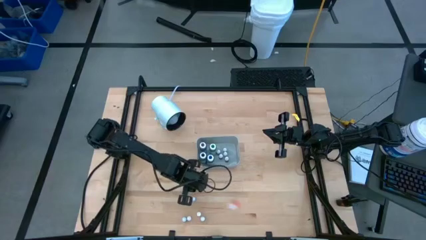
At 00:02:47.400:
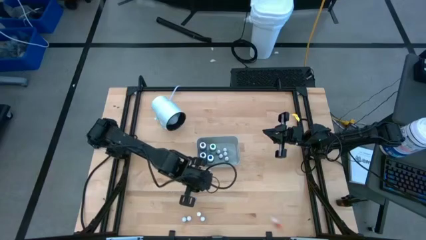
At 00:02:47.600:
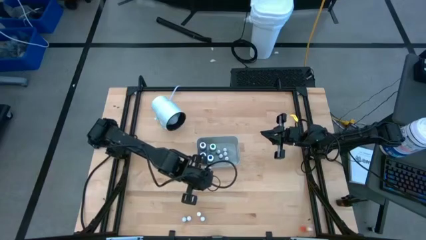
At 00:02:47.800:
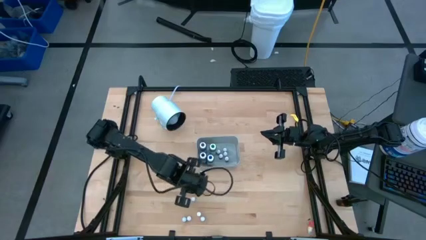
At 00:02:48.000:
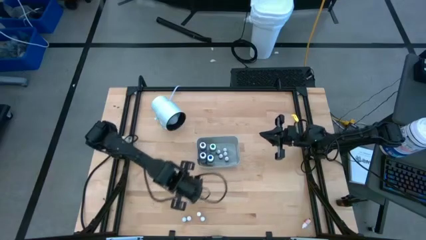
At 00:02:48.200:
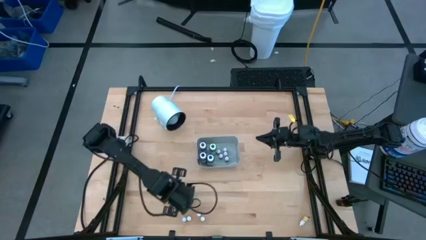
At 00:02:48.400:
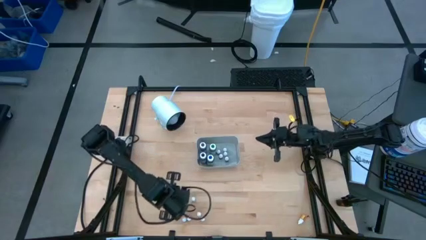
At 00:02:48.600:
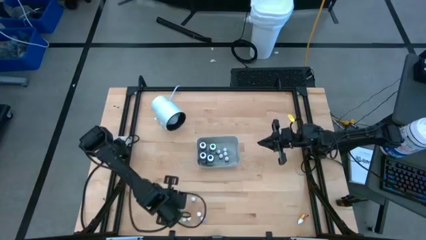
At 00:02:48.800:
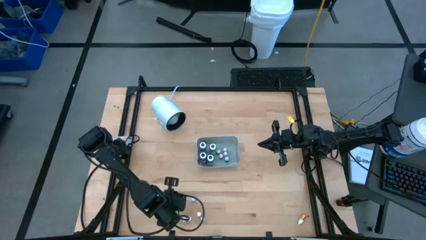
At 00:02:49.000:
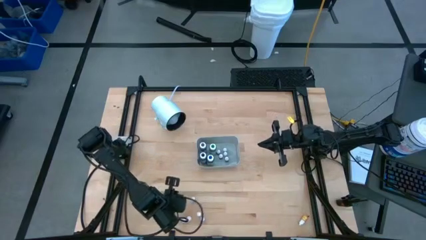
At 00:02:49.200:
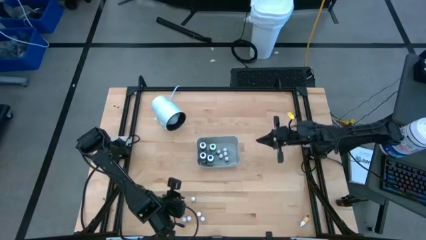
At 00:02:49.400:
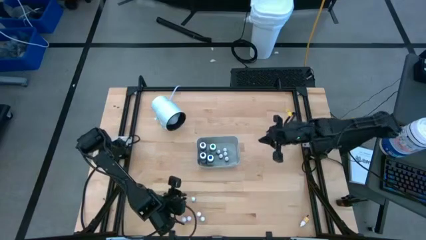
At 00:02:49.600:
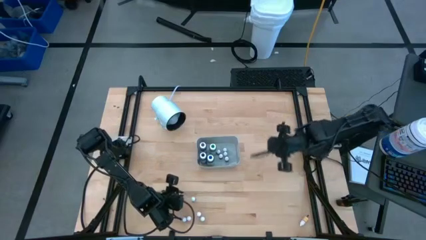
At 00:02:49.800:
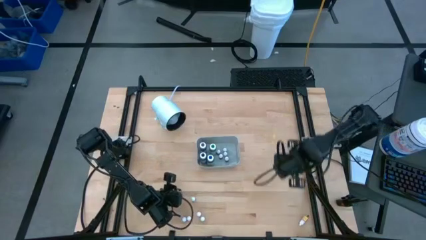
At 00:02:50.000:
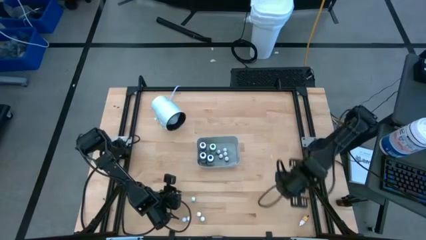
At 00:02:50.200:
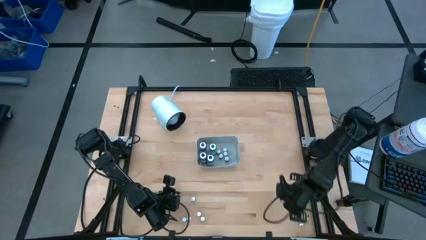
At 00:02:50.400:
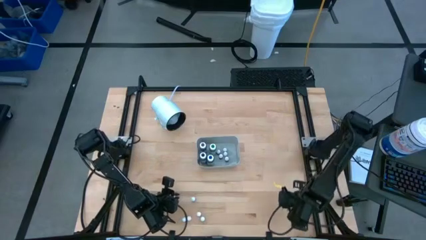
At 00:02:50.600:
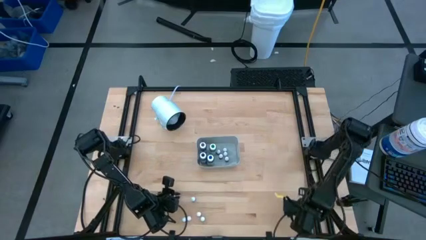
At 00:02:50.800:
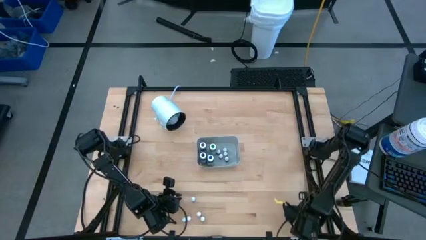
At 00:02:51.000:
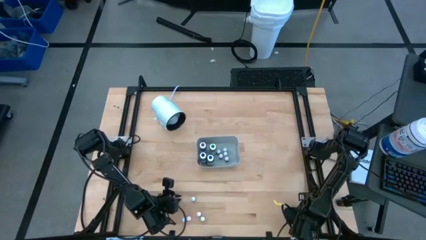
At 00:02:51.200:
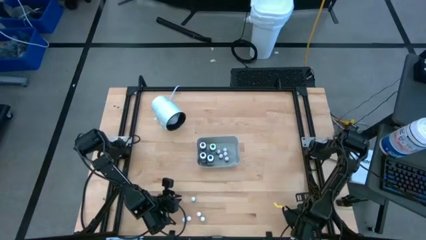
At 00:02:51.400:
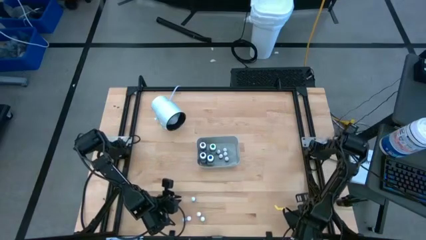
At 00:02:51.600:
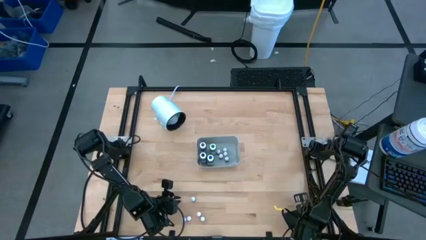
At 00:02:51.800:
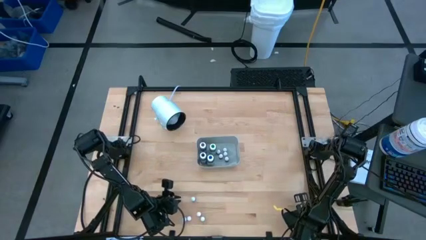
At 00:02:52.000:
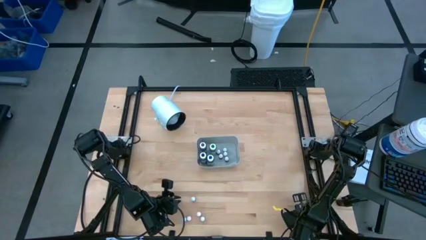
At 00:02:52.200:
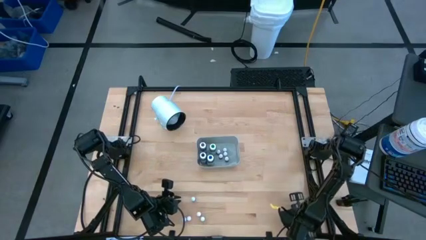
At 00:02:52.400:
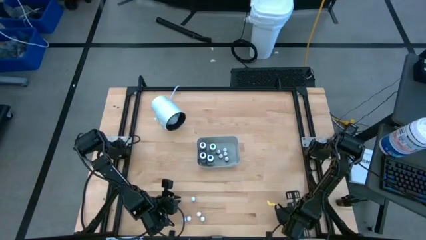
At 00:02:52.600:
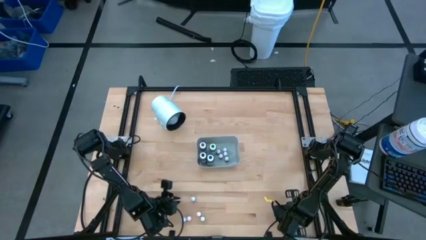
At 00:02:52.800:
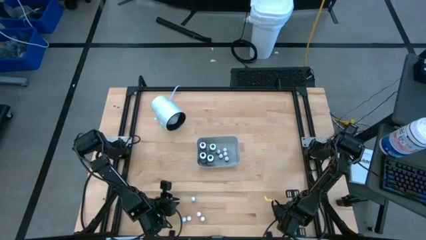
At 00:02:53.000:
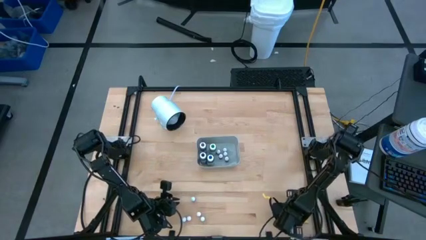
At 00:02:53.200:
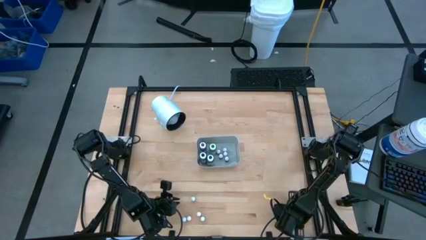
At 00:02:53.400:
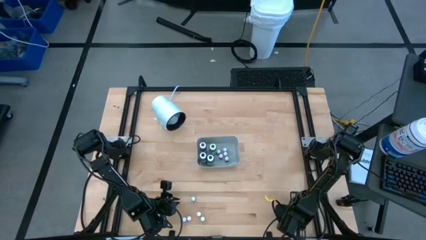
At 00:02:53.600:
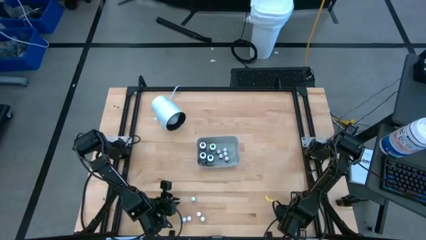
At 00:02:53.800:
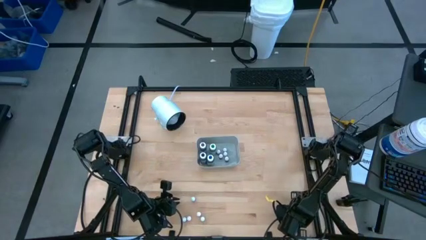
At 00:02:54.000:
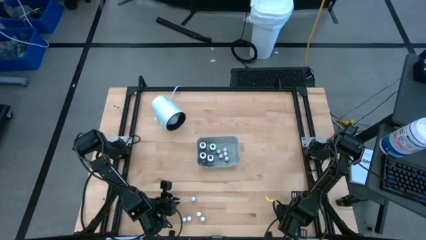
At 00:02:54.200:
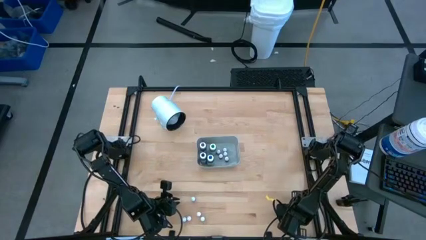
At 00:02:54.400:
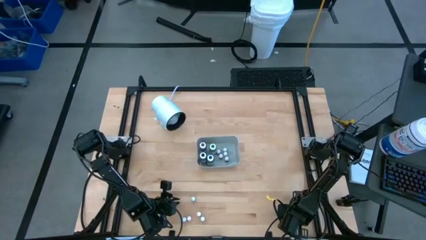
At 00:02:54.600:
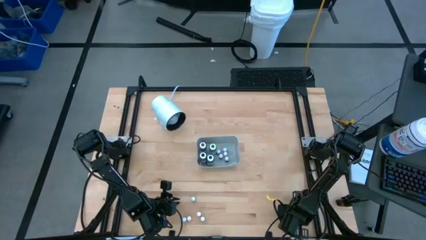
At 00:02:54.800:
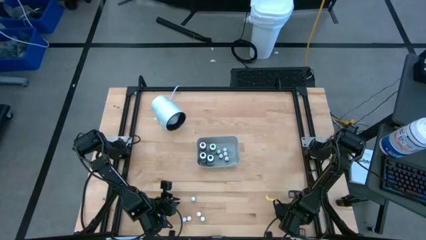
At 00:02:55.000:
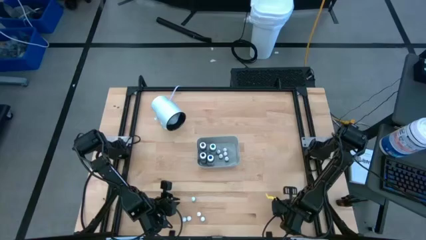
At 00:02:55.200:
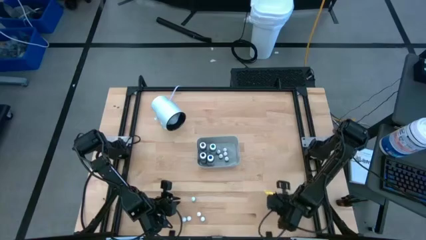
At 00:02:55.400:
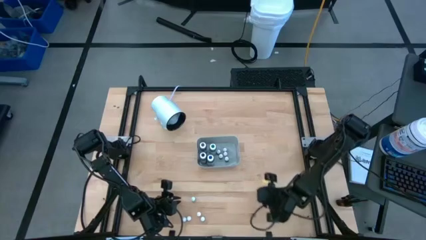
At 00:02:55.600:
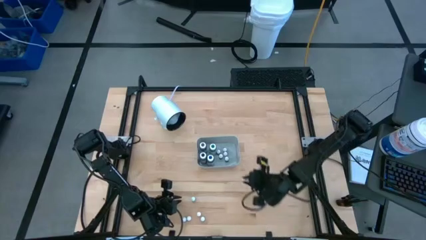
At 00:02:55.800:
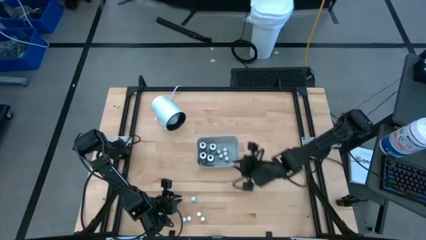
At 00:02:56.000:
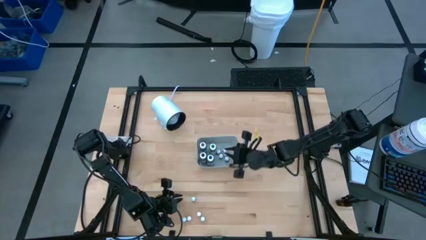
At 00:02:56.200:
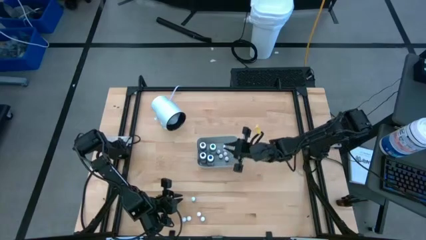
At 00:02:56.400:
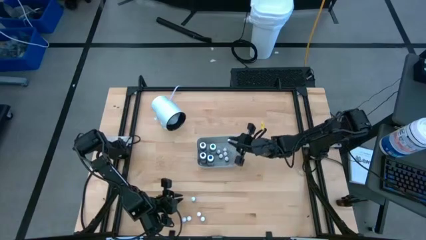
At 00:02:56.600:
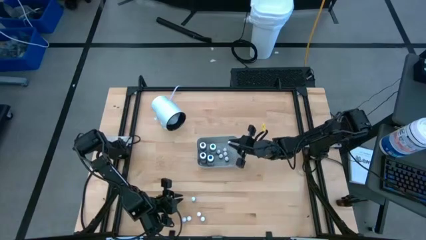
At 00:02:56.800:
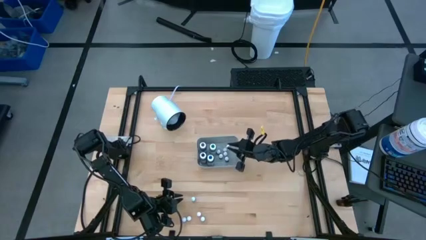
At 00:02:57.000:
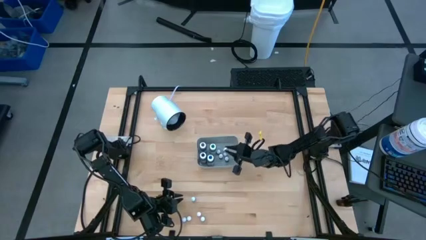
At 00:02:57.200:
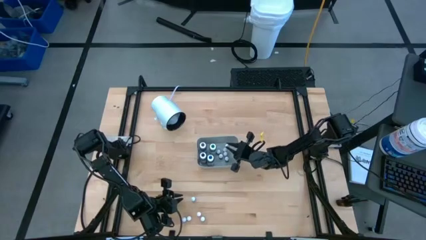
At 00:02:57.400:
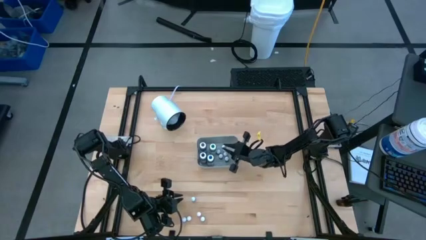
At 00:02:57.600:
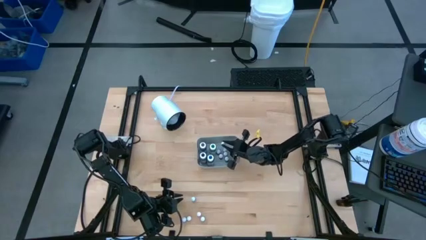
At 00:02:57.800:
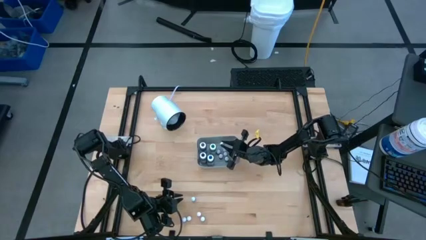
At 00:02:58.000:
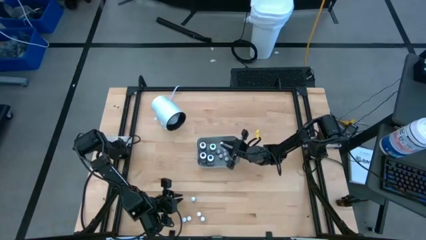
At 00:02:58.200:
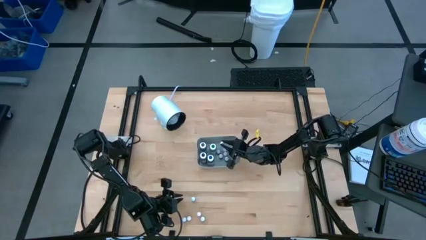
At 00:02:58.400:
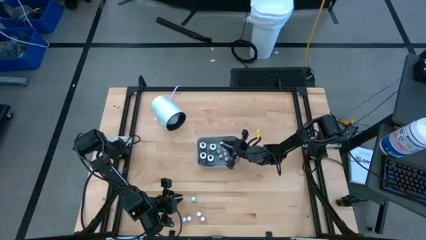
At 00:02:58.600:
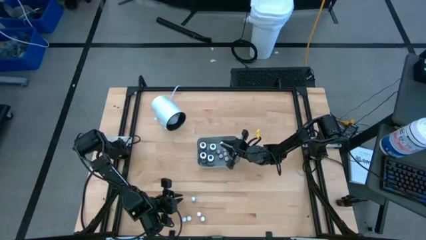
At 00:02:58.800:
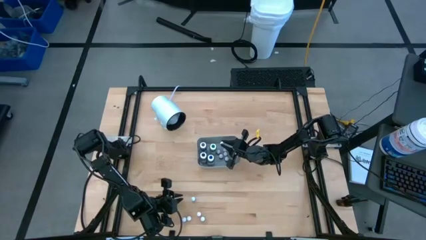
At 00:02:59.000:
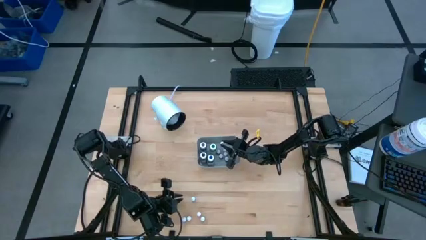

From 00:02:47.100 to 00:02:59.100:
Task: Pick & Place food coloring
Put the small orange food coloring bottle into the gray bin
